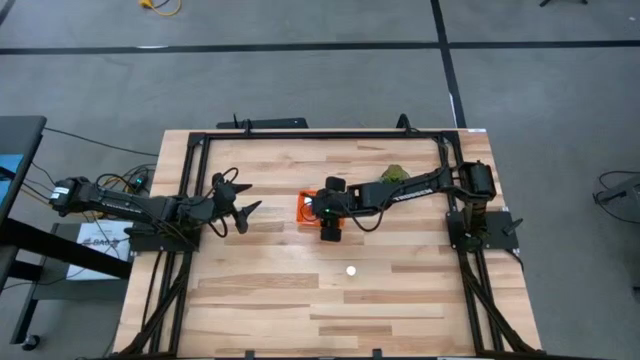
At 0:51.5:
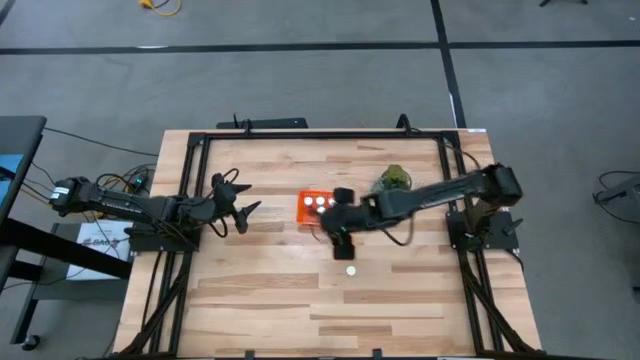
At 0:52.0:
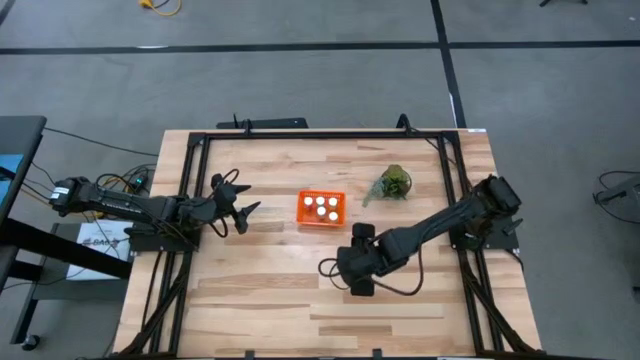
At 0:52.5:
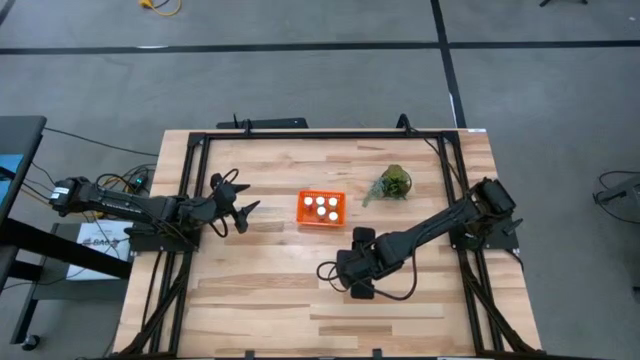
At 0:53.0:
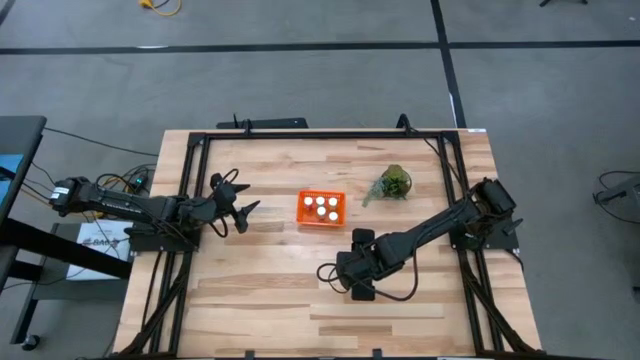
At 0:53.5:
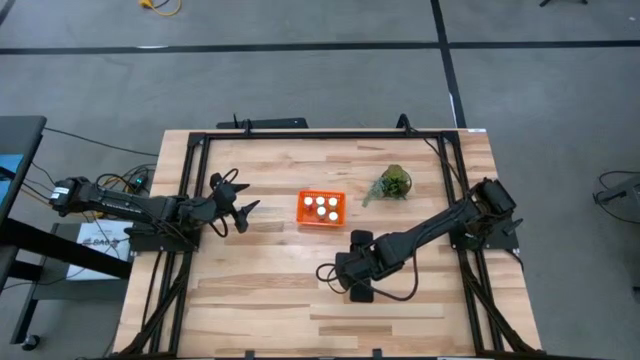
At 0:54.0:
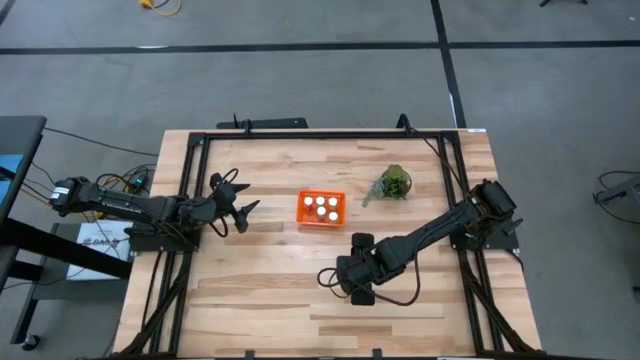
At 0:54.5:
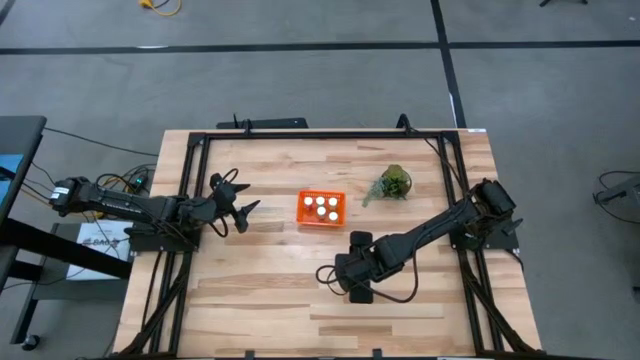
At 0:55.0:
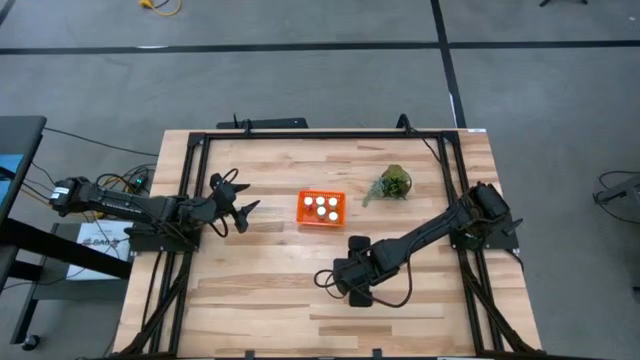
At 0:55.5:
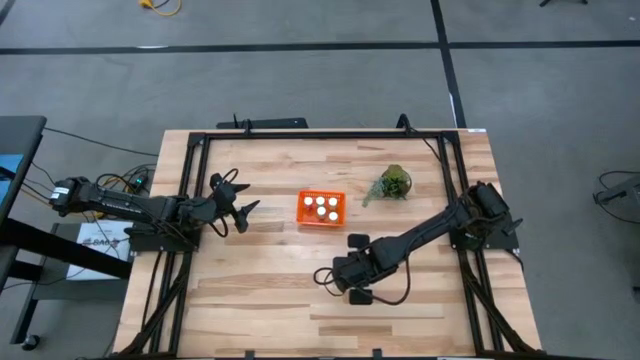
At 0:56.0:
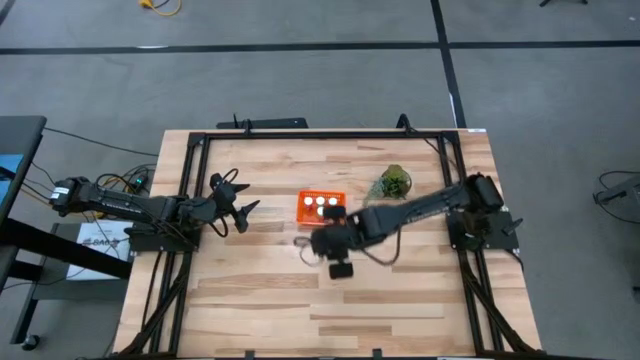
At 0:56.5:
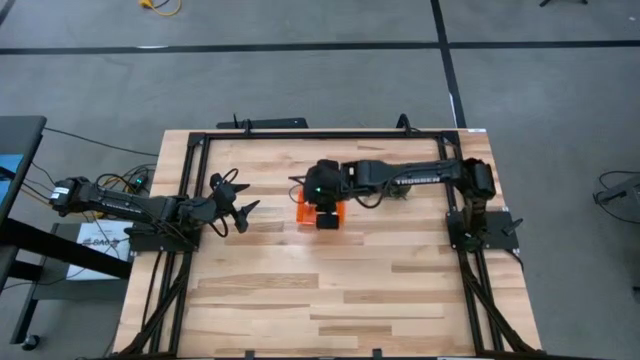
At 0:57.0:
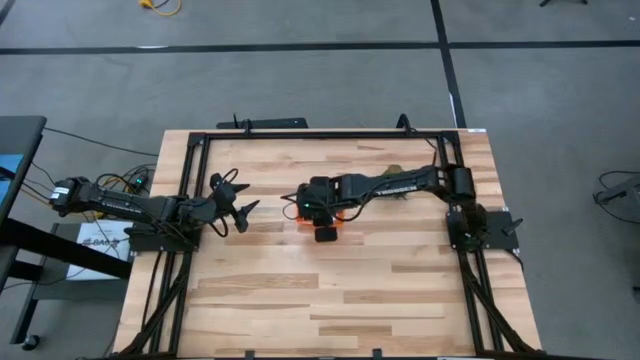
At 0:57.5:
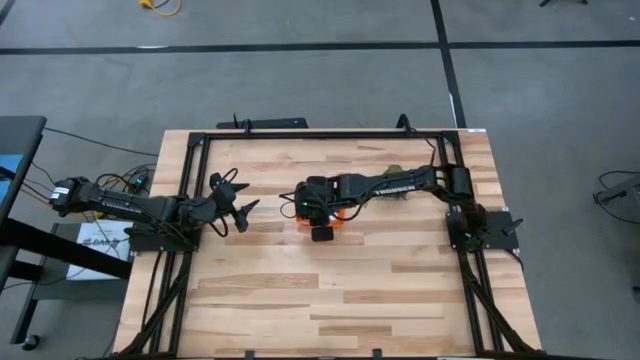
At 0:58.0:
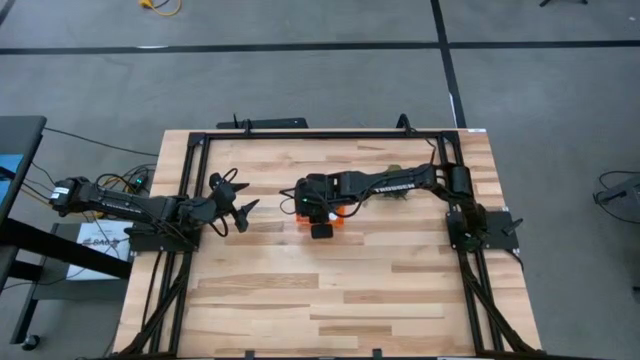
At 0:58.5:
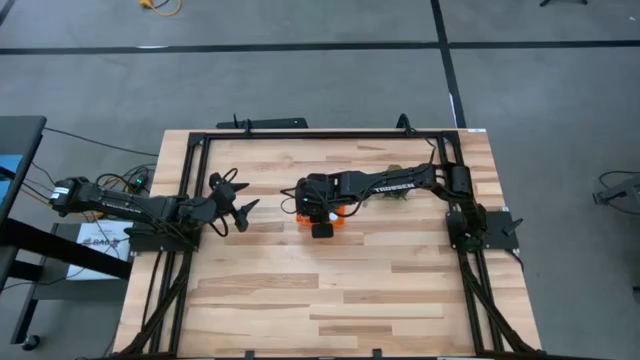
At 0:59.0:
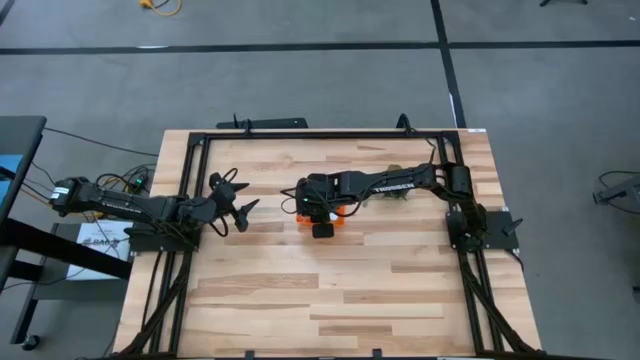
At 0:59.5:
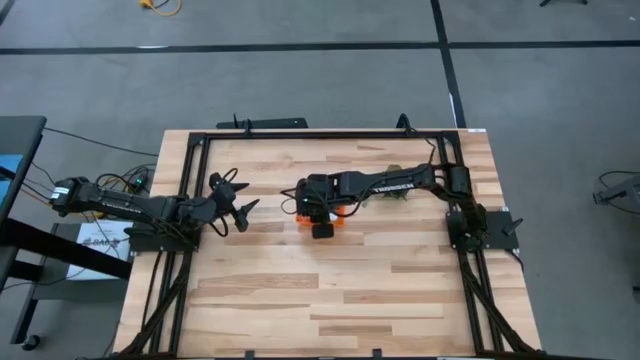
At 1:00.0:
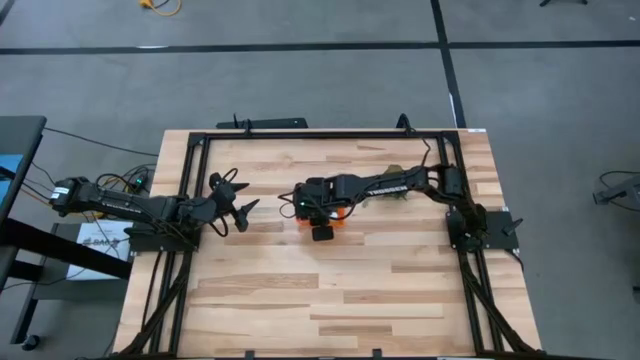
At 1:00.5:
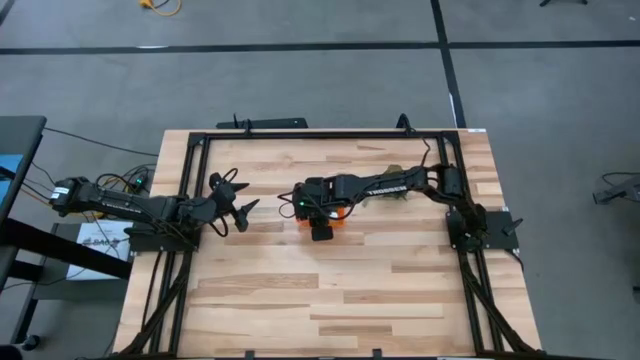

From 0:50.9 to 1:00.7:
Task: Pick and place pill bottles into a basket
Put the yellow pill bottle into the orange bin

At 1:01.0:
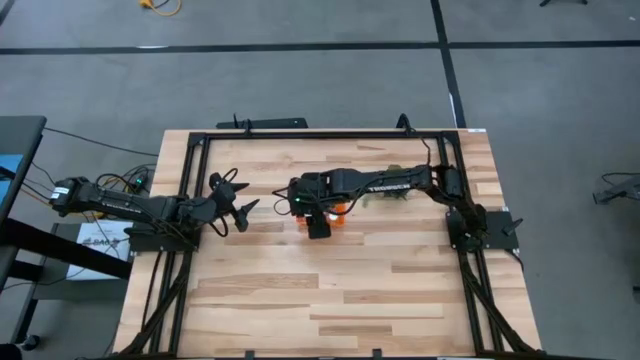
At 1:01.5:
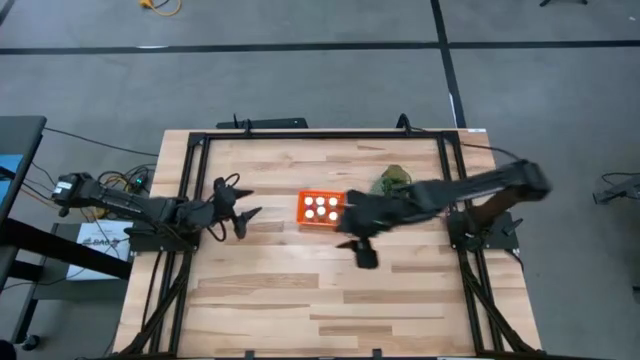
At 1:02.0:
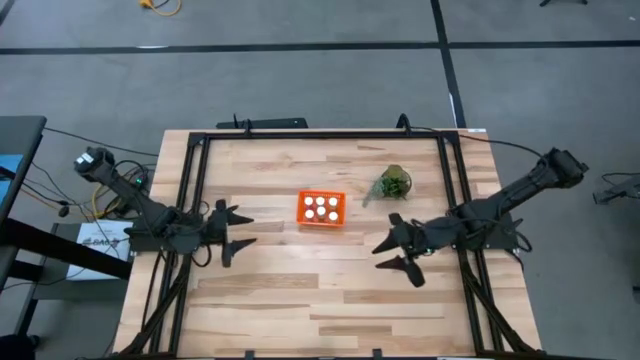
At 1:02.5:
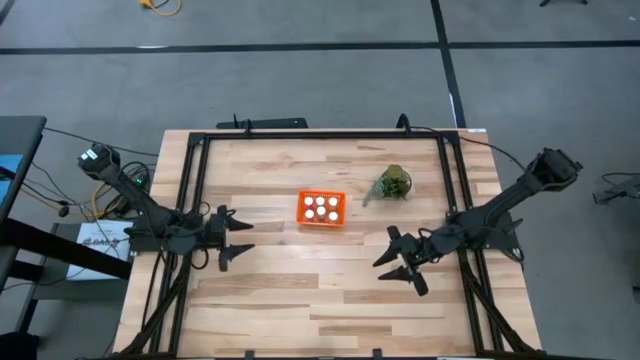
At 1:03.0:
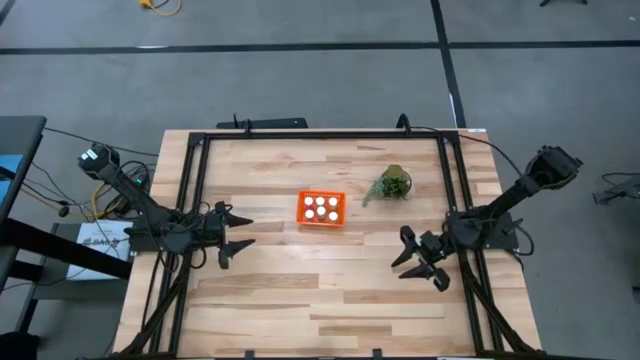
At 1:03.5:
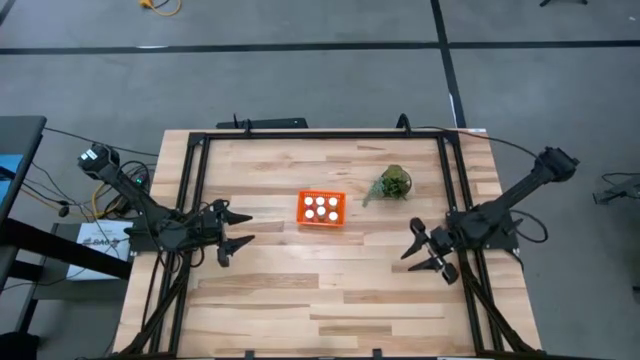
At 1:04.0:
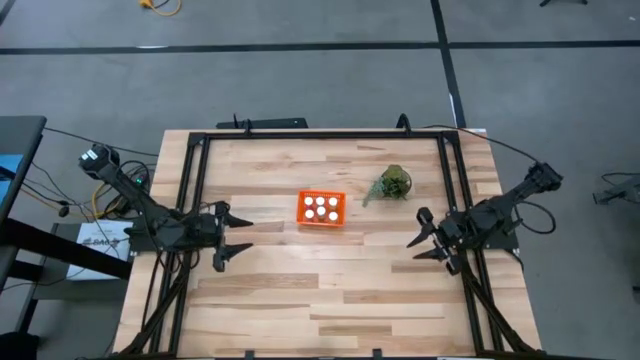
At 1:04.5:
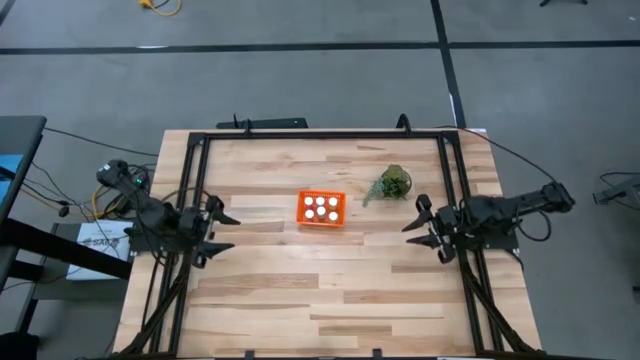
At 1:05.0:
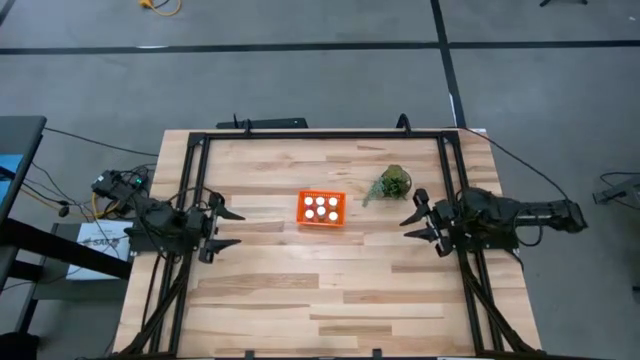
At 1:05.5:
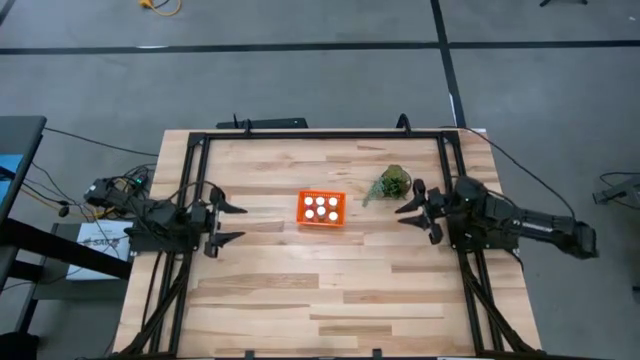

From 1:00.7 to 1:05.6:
Return to Home Position

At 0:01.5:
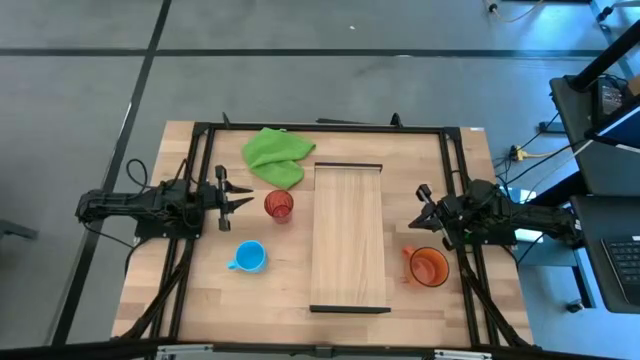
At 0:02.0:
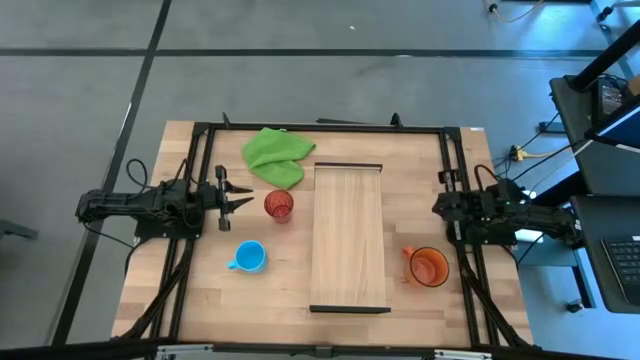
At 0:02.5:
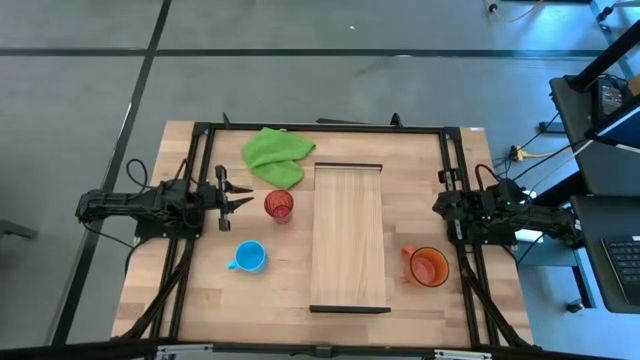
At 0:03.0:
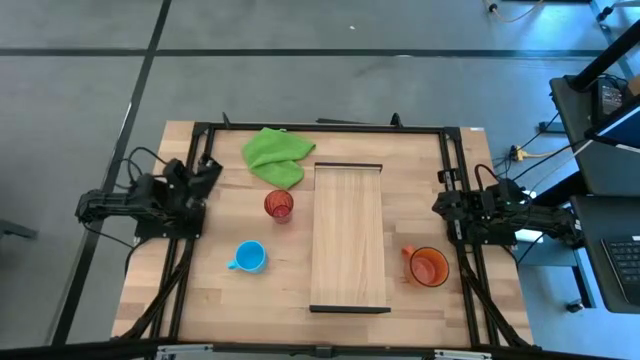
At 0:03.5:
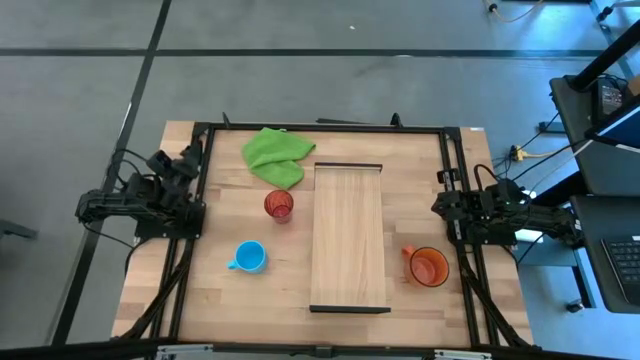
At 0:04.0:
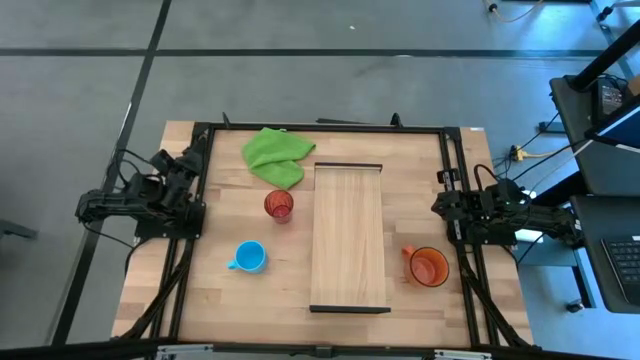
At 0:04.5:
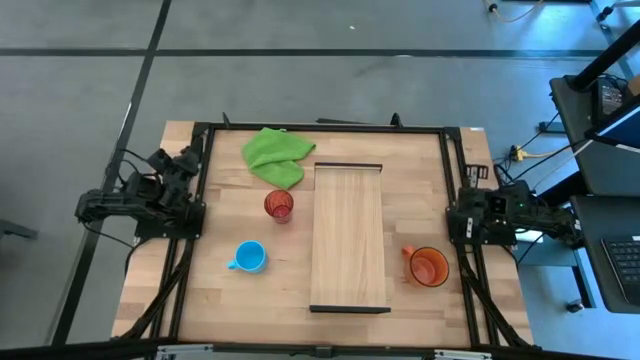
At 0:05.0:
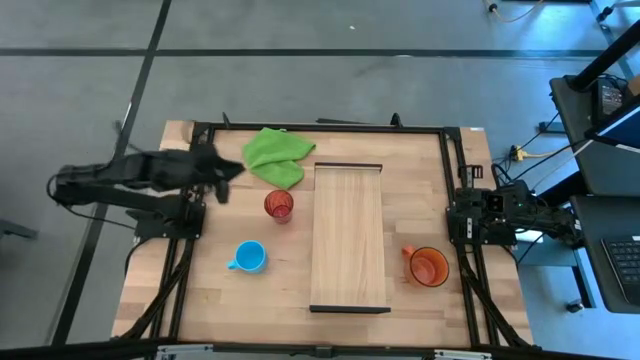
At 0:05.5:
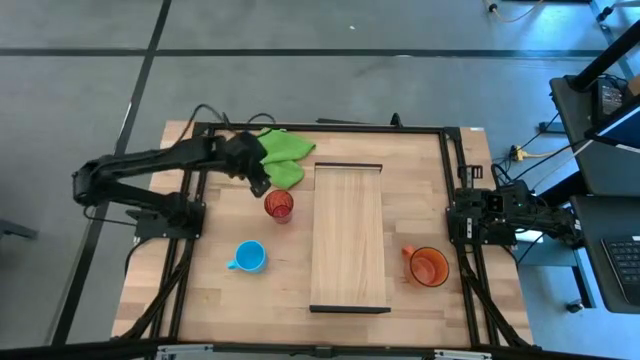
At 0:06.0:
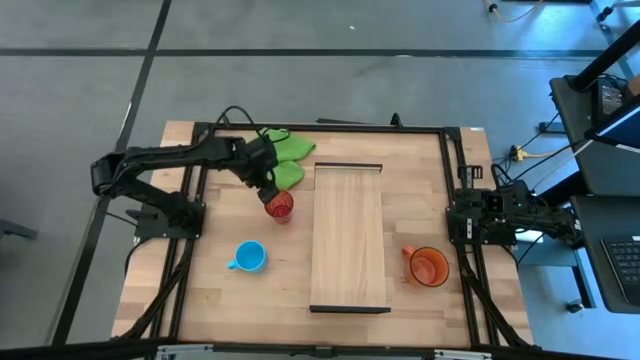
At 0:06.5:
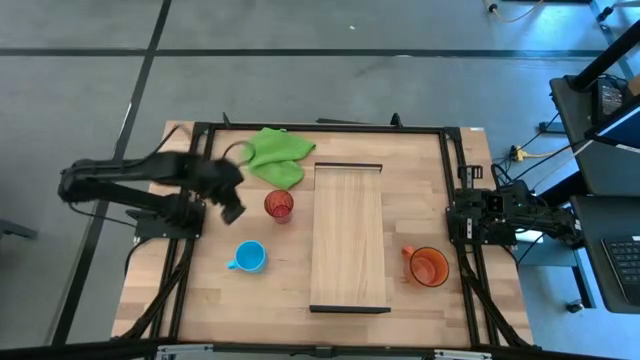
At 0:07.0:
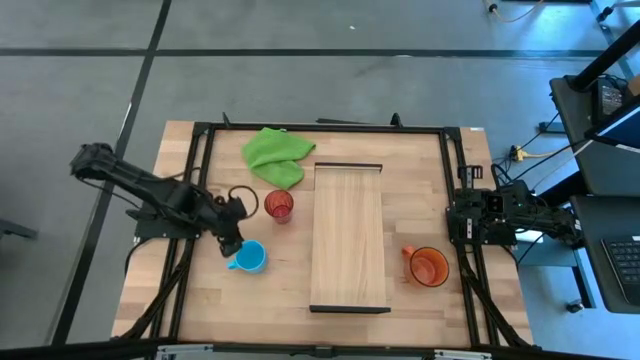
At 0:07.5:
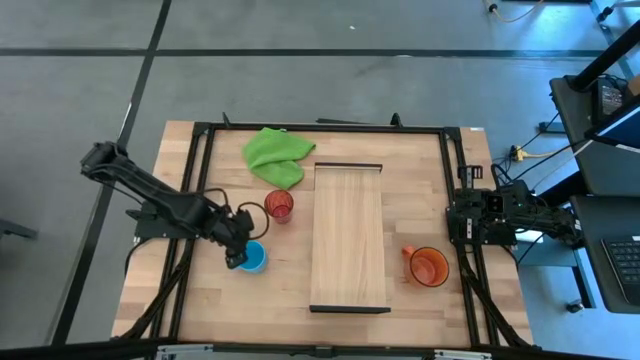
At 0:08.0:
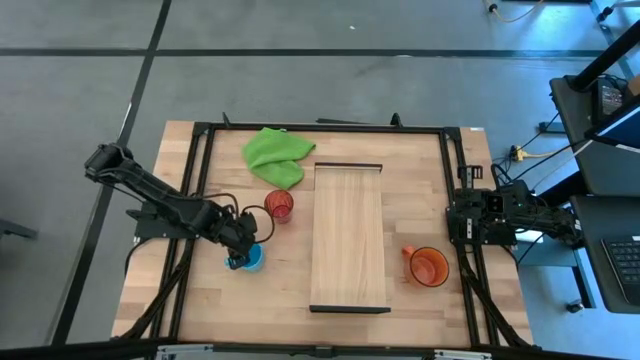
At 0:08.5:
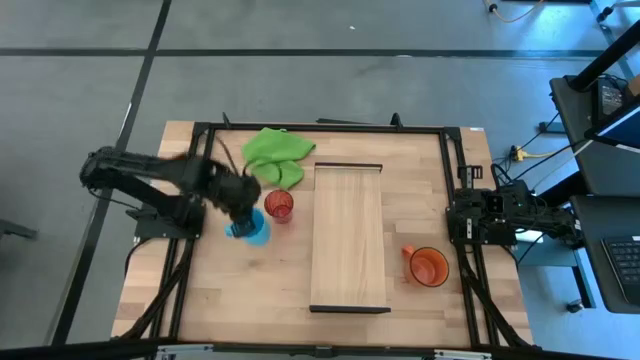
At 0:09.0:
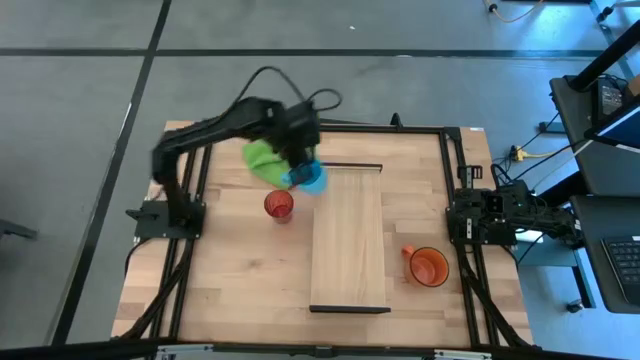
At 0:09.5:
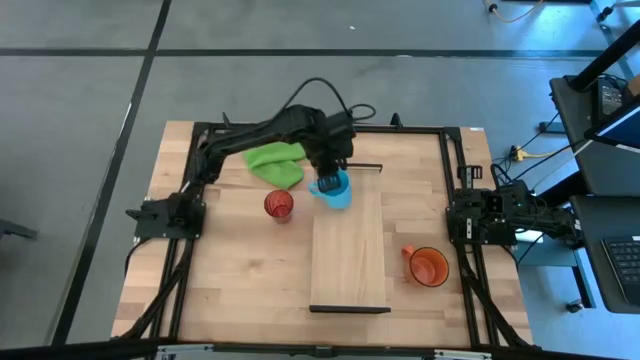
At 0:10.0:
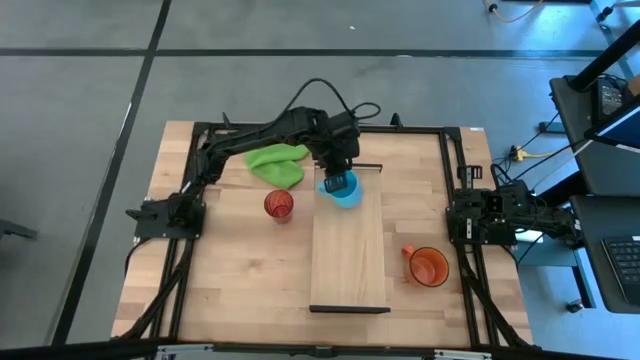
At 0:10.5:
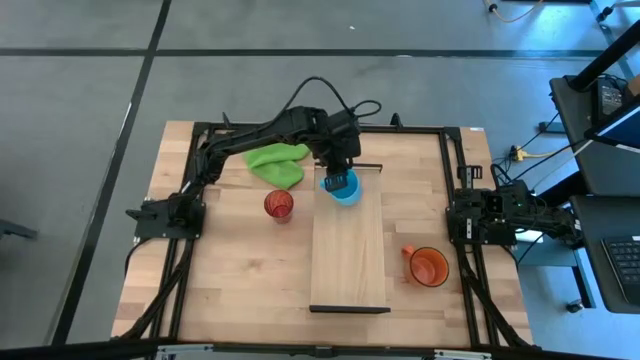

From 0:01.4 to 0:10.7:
Task: Stack small to large cups/mugs on shelf
Put the blue mug on the shelf
